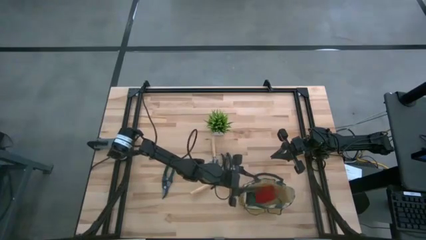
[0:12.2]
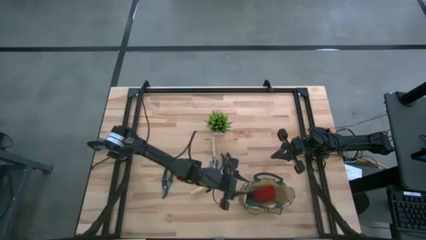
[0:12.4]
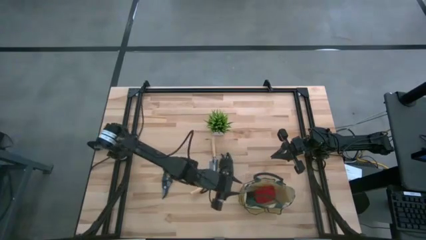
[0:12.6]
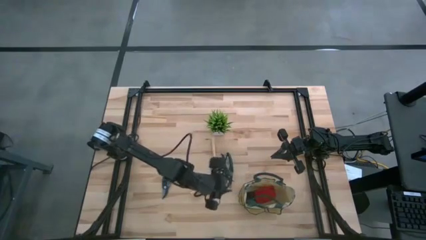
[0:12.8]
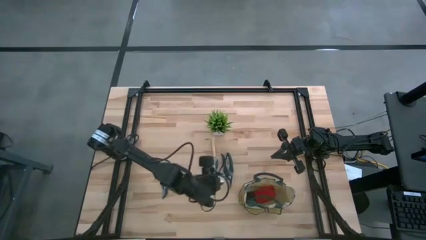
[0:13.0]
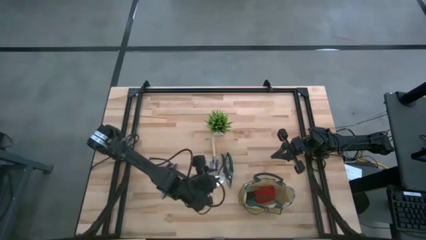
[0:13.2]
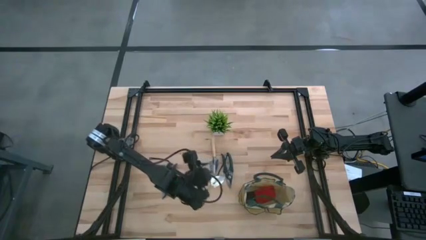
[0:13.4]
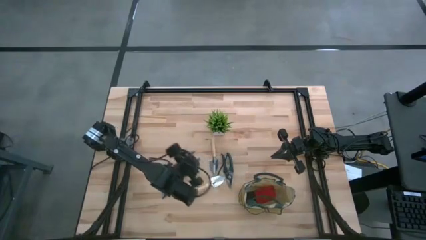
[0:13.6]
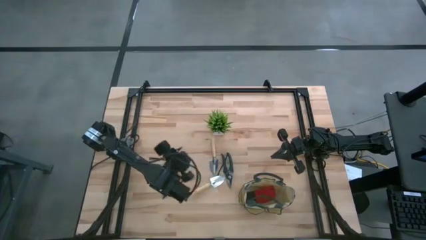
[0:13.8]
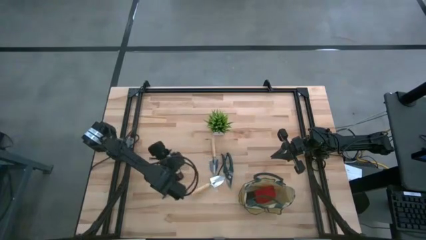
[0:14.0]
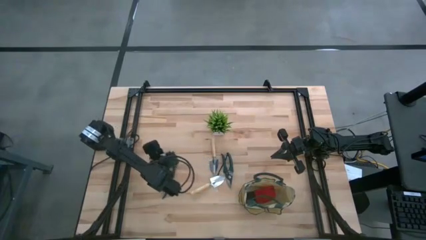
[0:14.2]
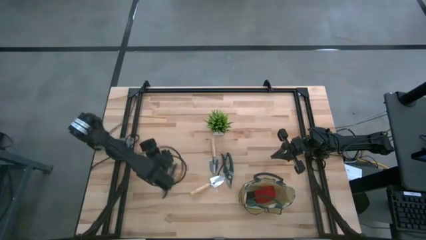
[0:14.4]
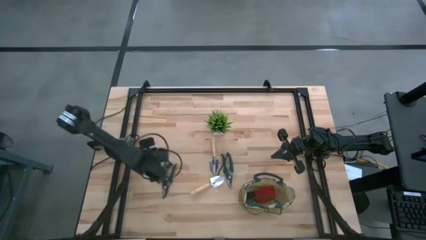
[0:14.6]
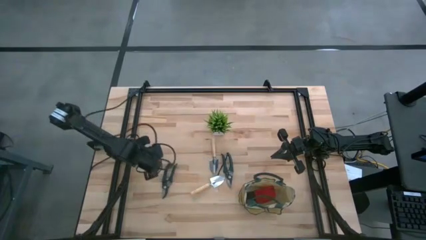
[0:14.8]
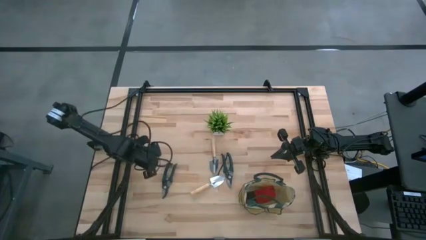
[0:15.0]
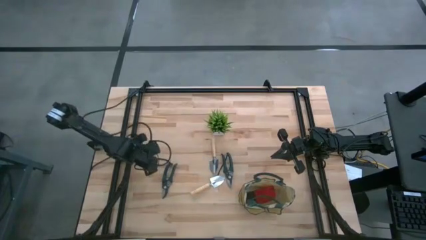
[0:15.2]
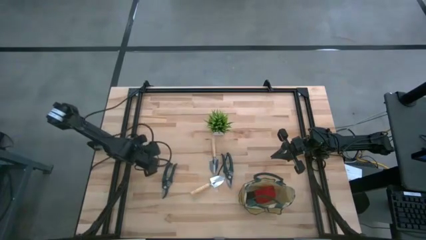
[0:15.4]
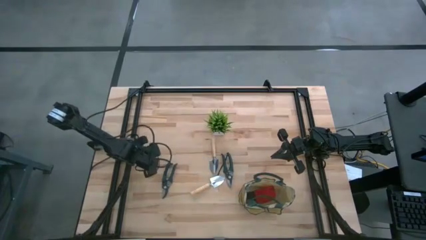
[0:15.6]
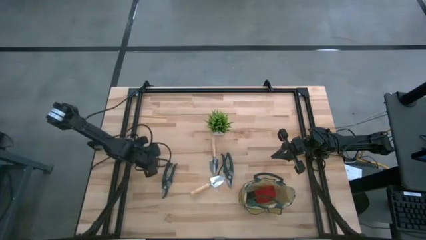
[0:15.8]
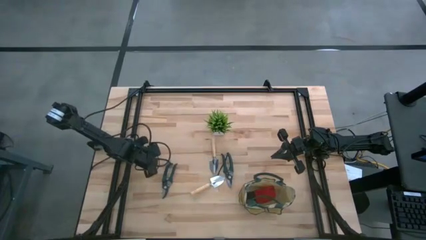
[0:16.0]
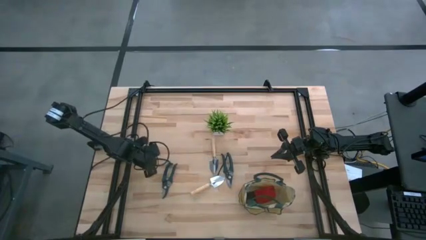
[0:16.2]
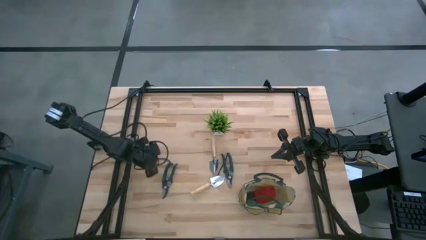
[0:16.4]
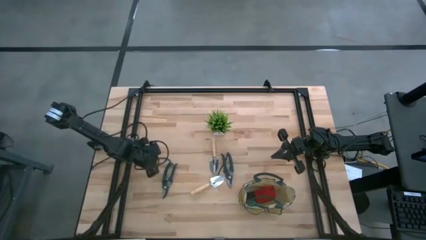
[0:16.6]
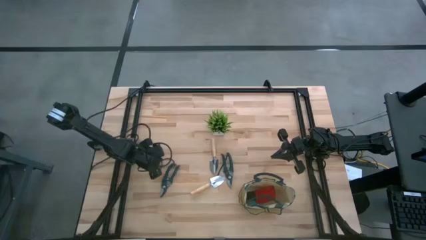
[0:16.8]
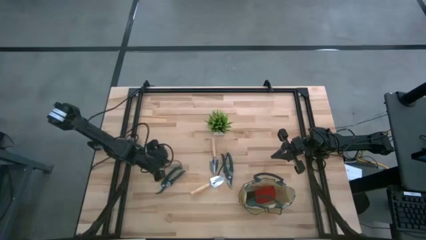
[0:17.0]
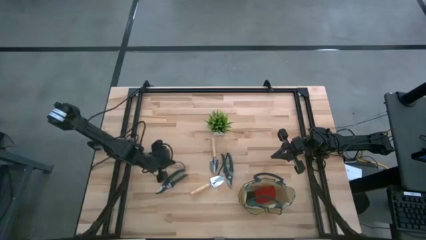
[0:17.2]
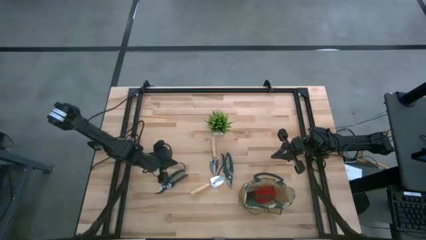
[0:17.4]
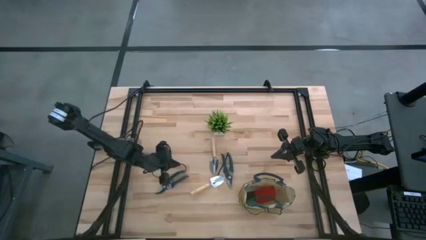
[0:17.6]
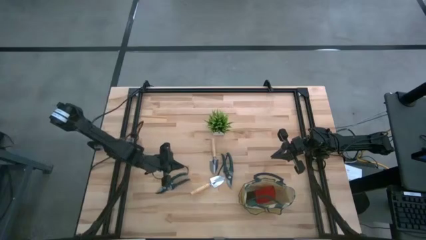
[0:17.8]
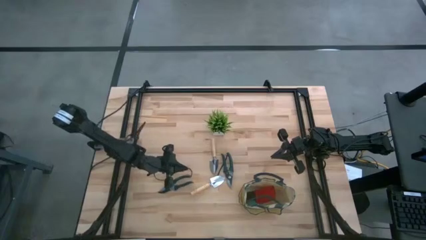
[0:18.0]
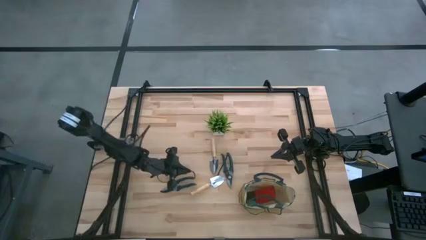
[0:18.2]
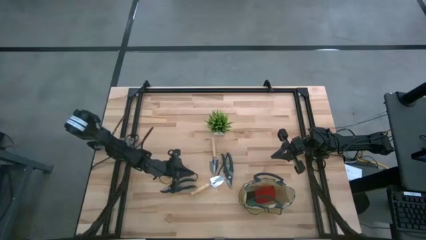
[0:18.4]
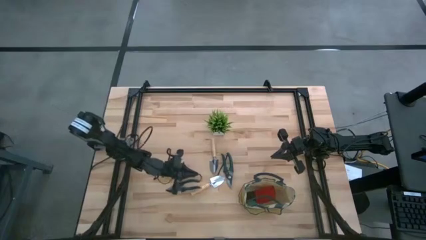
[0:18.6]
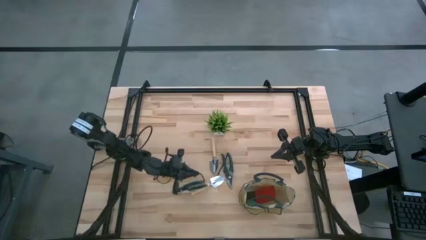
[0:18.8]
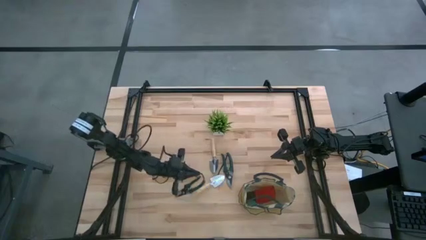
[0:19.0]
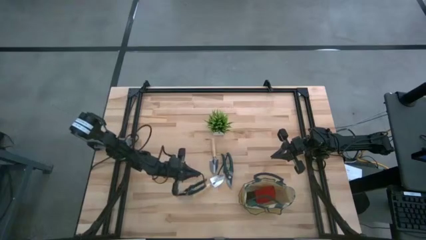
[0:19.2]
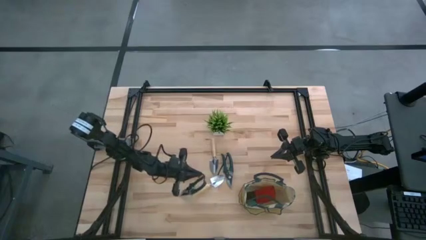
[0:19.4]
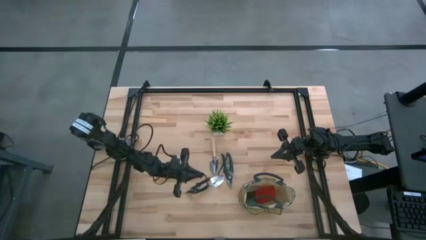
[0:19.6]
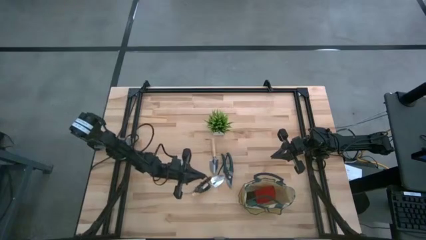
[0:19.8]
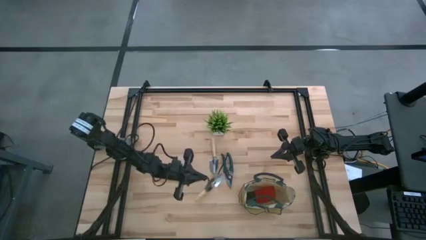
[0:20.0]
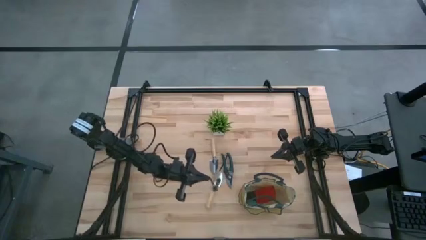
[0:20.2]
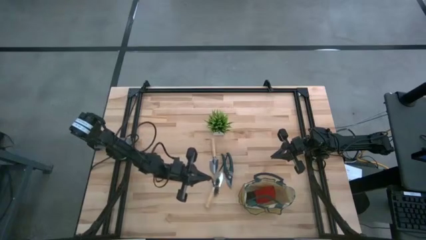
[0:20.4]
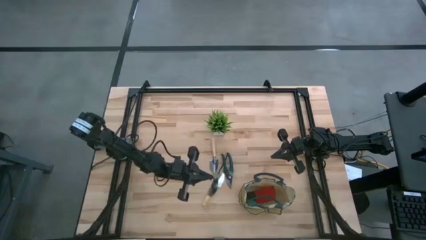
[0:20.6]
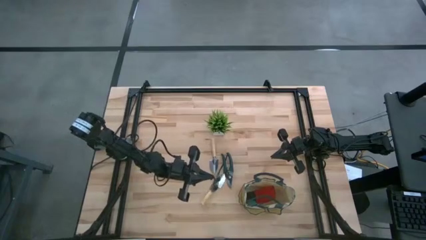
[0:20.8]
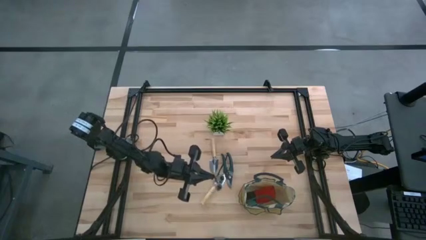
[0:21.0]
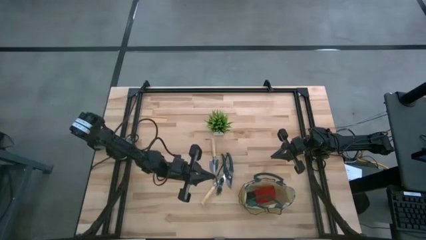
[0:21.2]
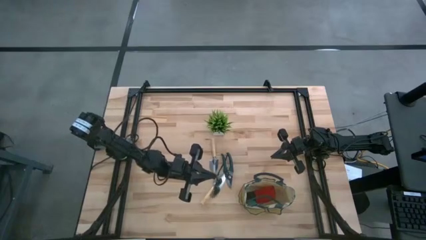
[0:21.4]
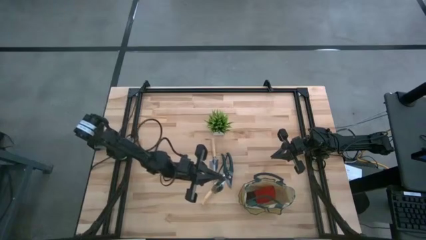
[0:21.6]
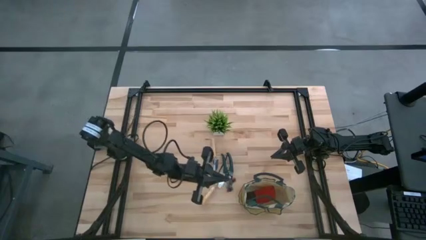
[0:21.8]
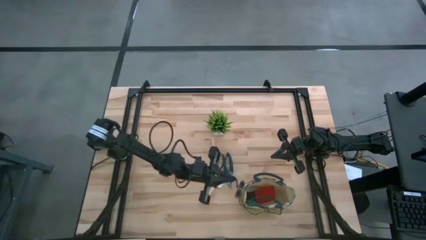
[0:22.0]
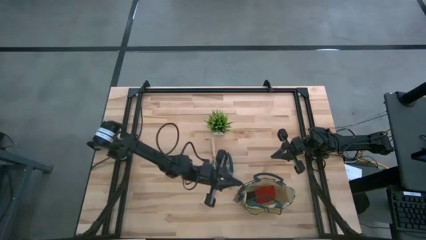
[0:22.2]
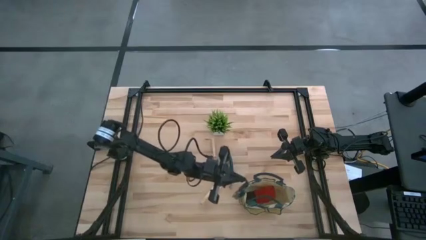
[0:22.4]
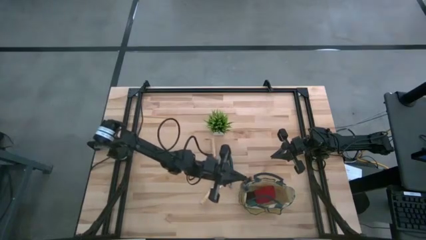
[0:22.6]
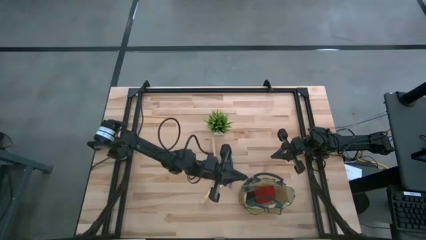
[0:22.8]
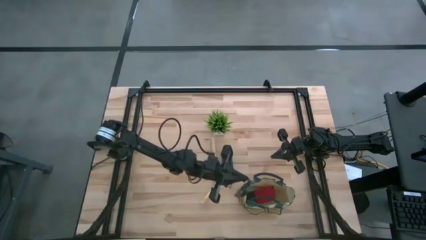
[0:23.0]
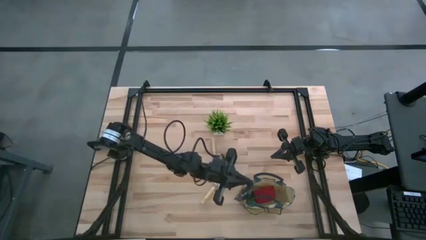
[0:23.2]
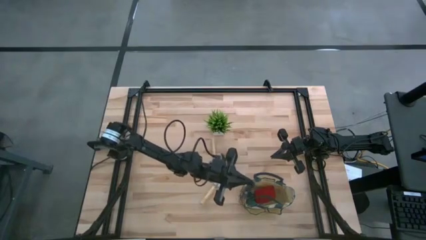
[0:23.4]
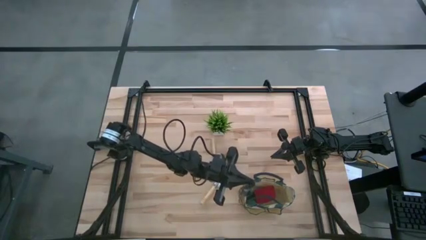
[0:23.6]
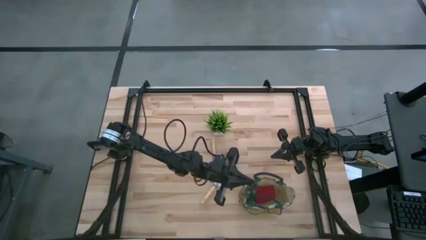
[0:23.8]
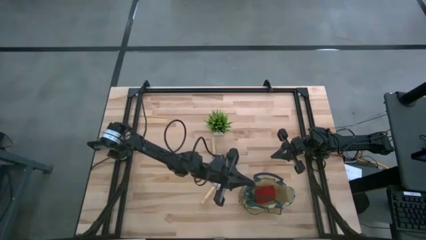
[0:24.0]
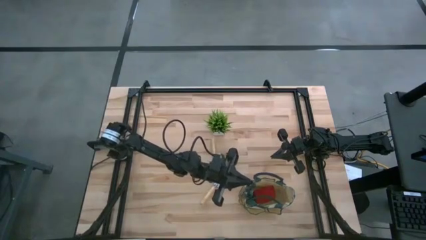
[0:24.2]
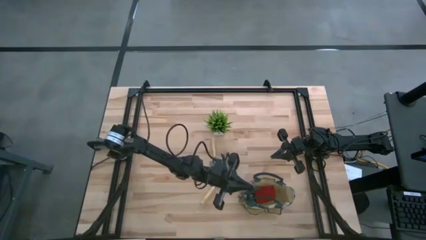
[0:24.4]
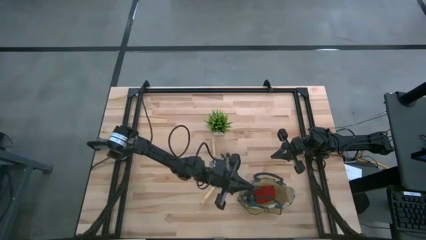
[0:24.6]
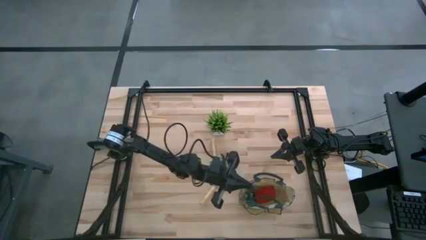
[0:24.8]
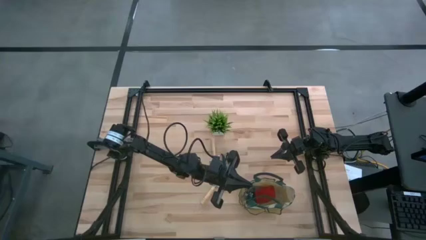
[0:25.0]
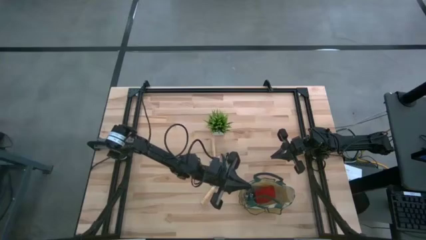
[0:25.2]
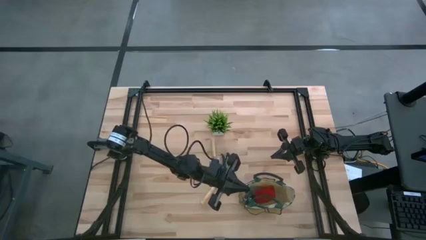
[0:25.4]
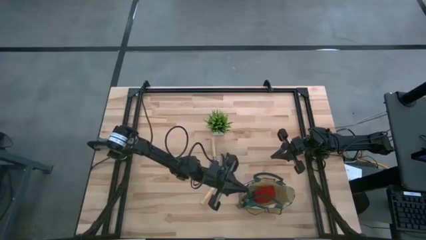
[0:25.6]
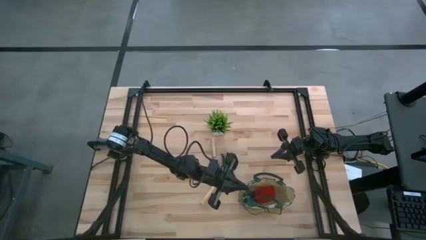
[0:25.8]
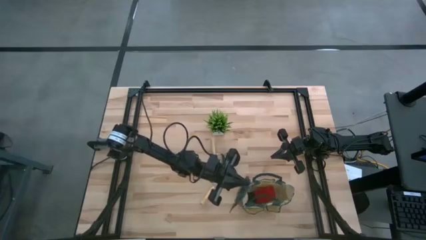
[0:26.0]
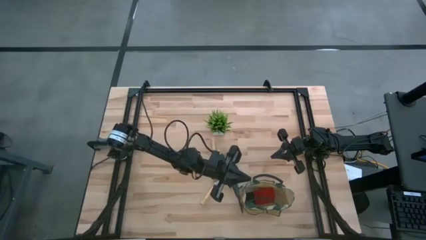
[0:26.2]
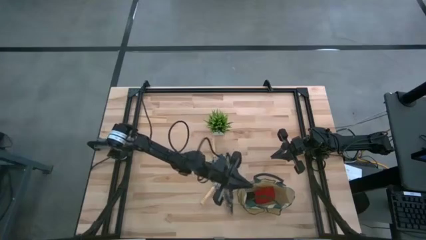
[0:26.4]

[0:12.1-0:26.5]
Task: Pick & Place Garden tools in Gardening bag
Put the green shear scissors into the green gardening bag
